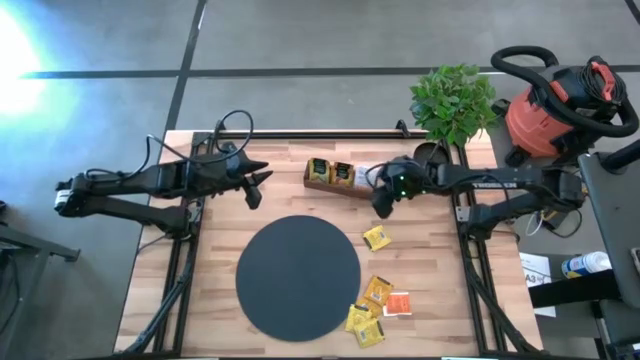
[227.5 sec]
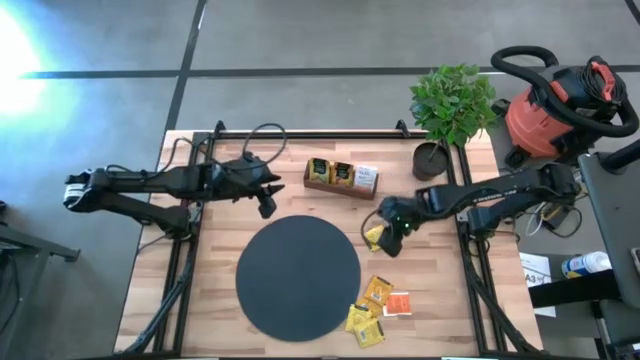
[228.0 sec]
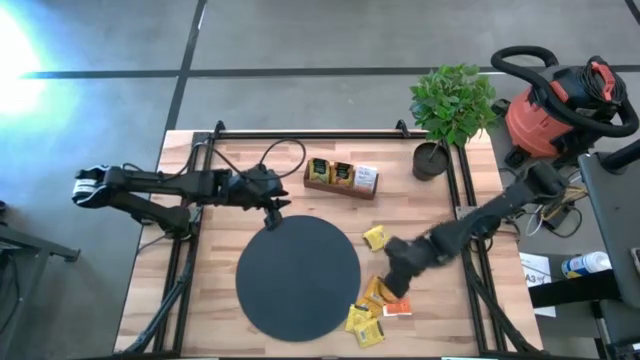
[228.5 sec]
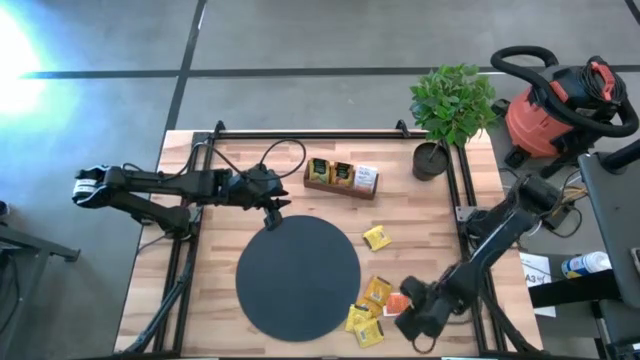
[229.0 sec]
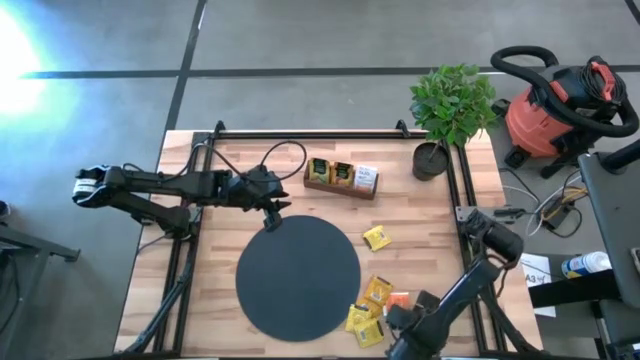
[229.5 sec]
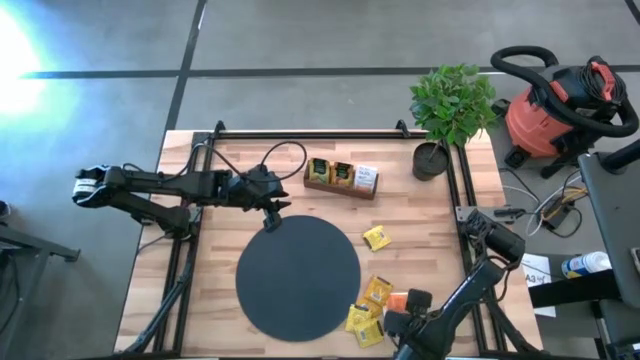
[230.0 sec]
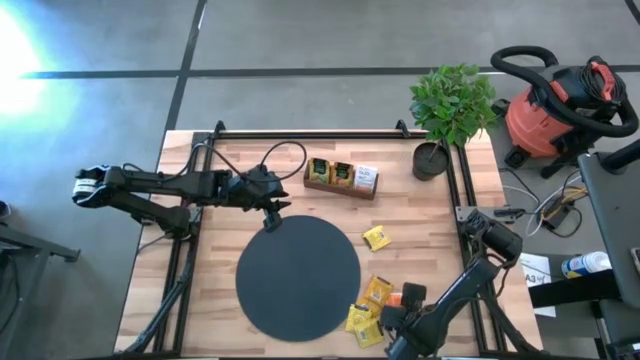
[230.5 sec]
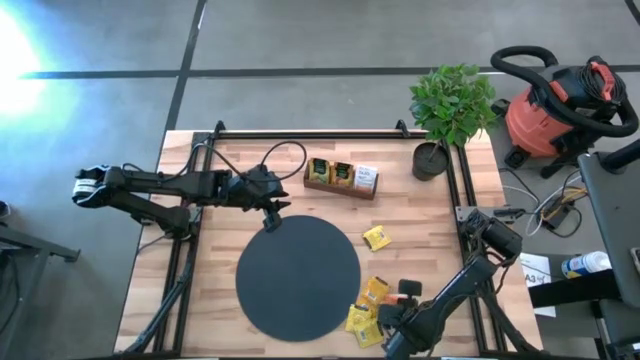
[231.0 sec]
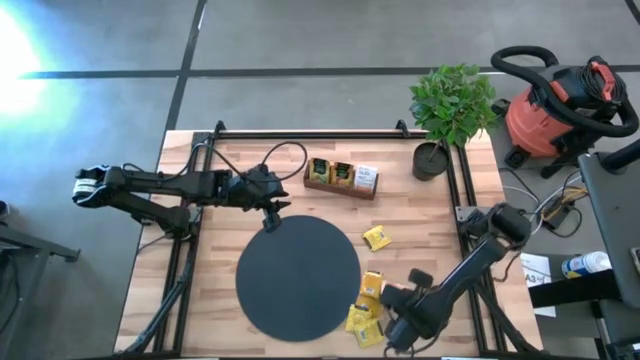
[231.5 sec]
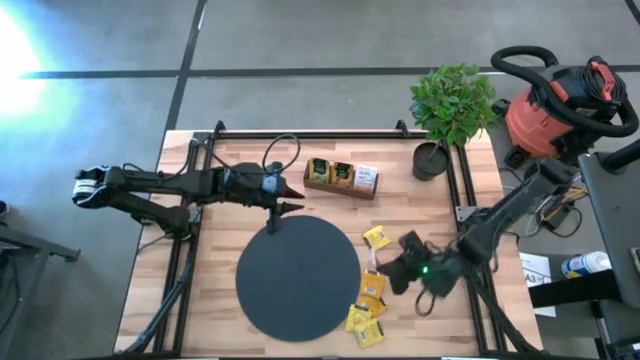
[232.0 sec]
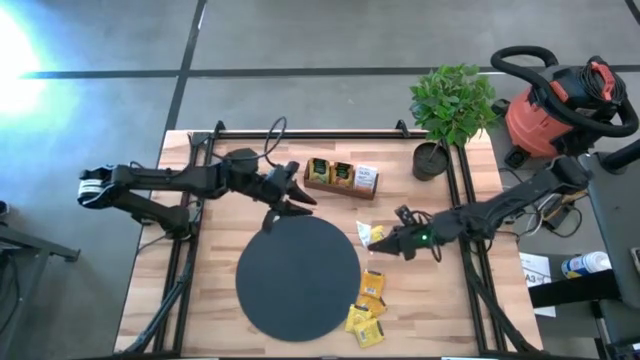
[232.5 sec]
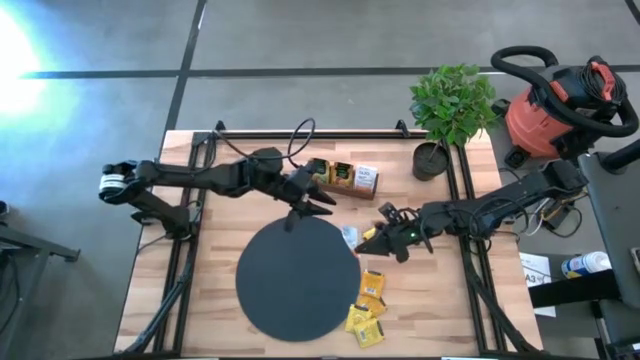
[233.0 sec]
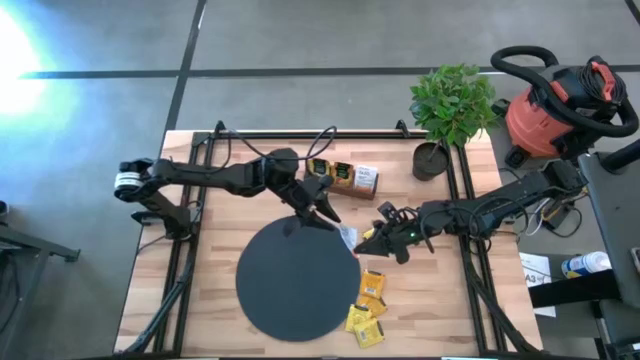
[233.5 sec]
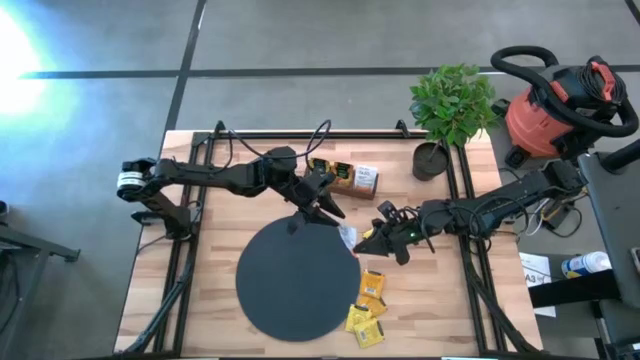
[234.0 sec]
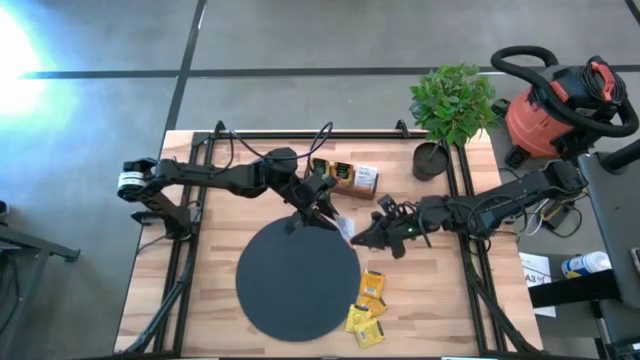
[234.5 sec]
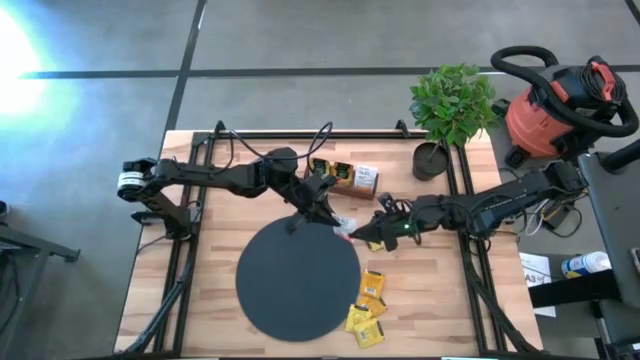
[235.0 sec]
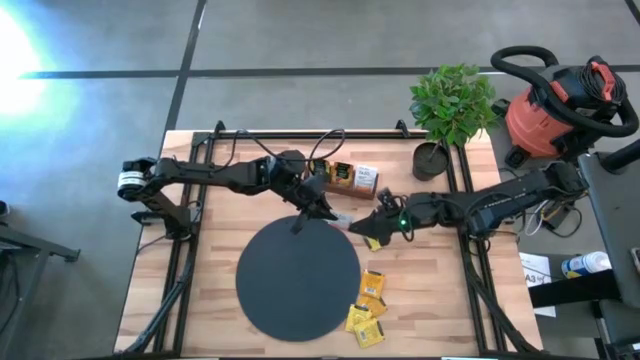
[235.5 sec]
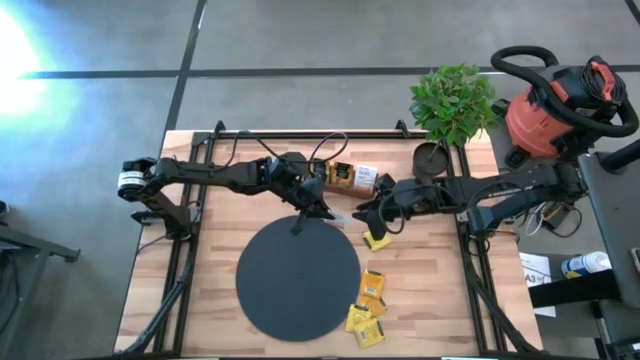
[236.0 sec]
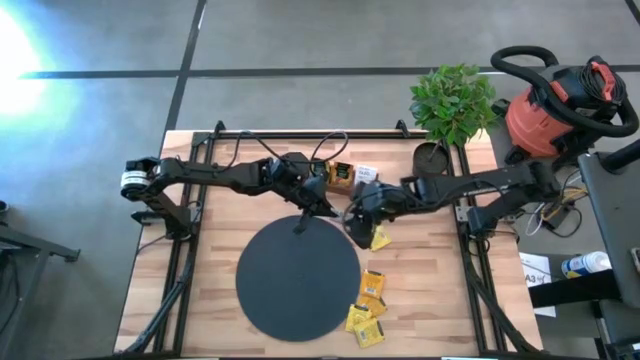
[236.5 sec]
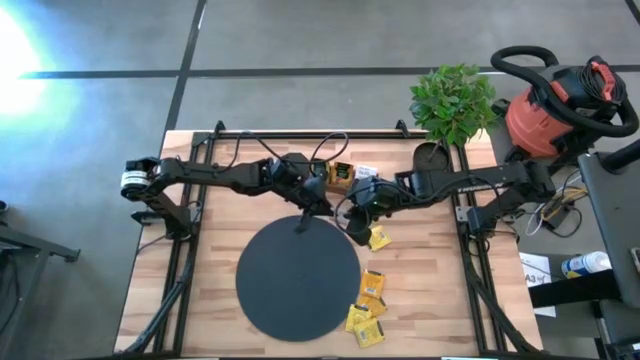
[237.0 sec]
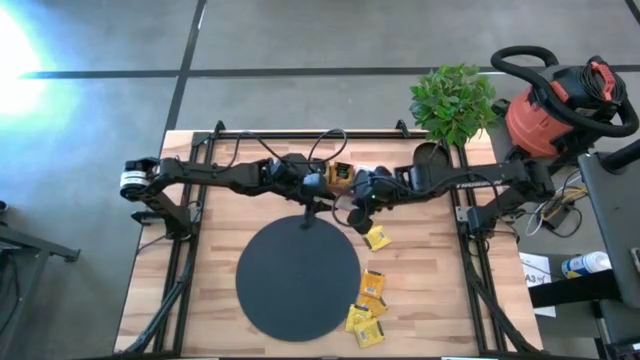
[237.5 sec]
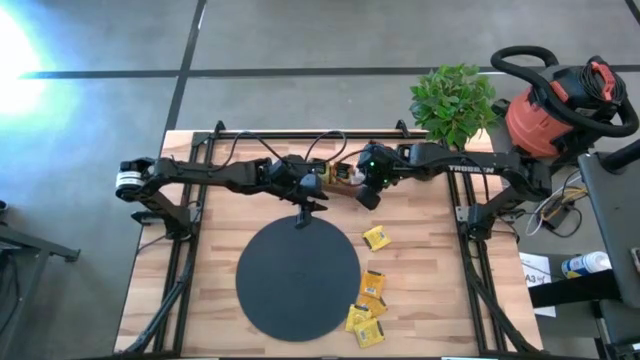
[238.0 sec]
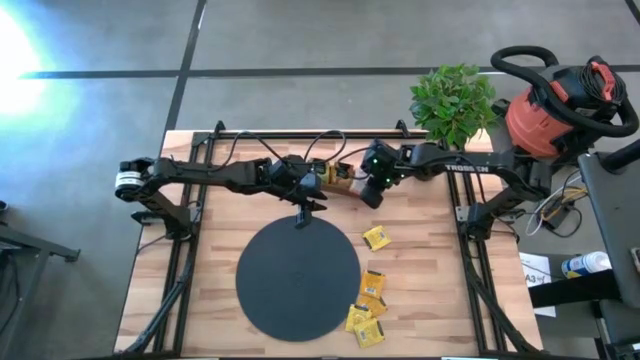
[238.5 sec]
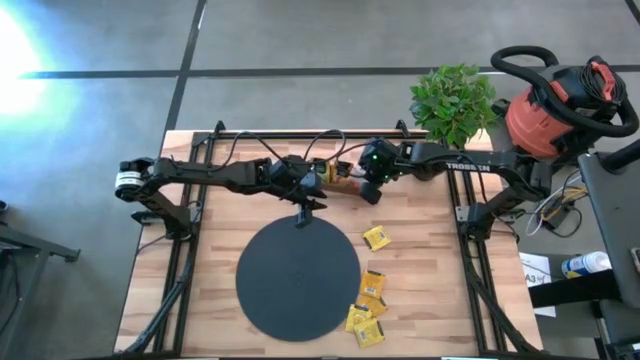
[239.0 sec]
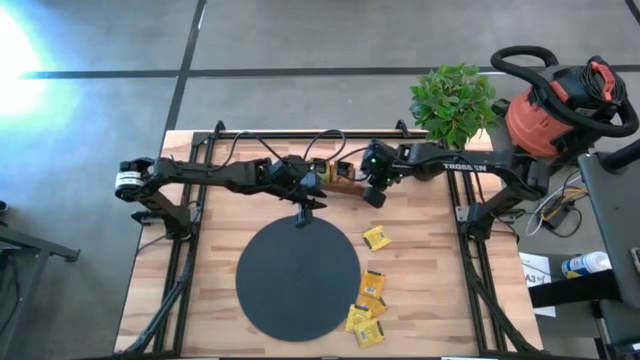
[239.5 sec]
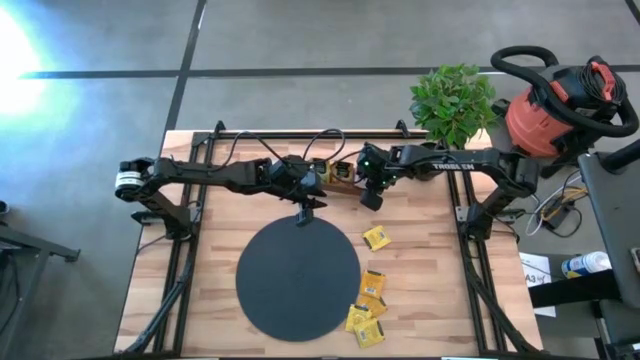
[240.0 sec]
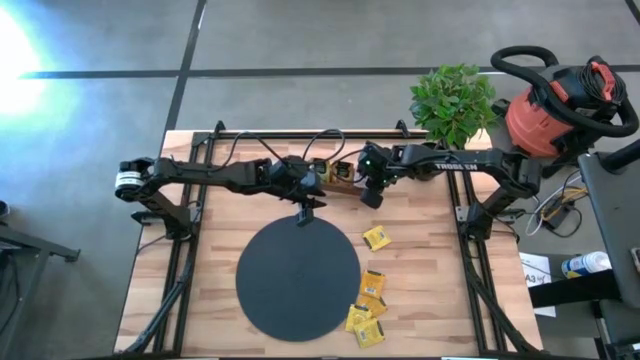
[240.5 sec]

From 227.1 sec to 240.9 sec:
Task: Pick & Place Tea
Put the white tea bag into the right section of the wooden organizer

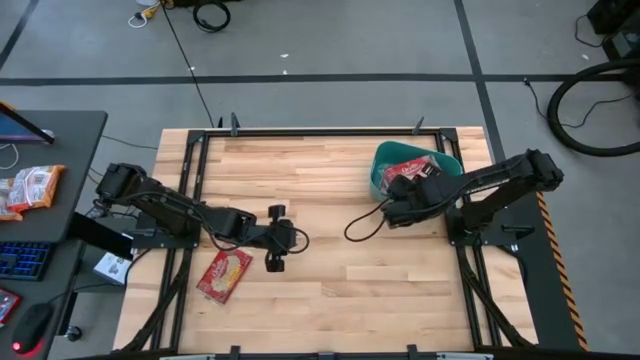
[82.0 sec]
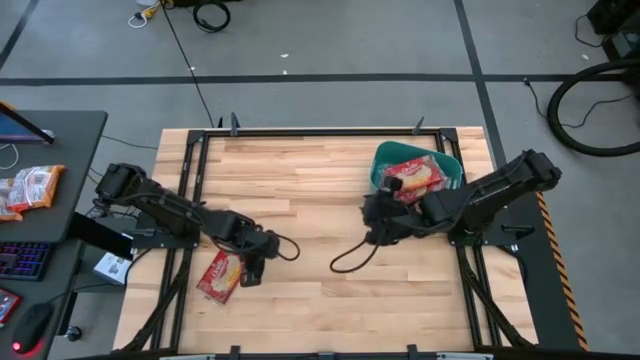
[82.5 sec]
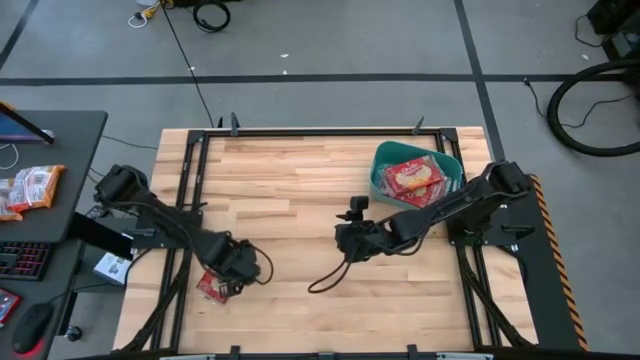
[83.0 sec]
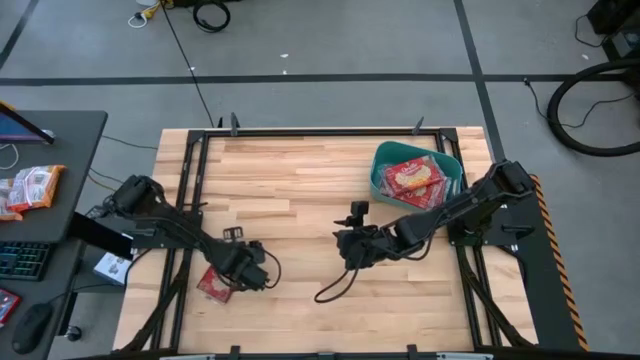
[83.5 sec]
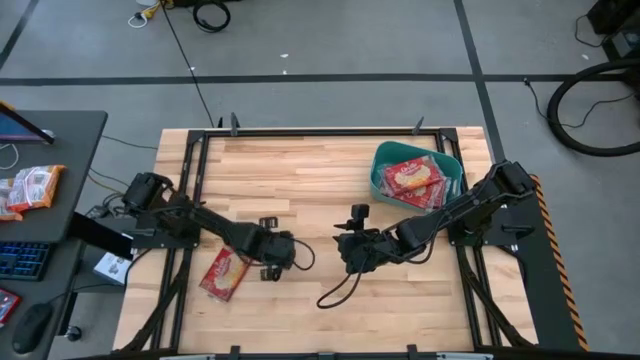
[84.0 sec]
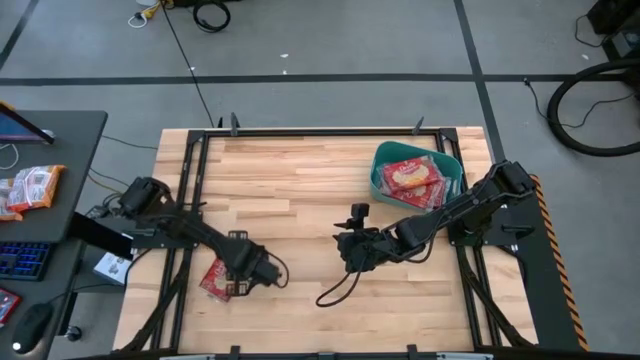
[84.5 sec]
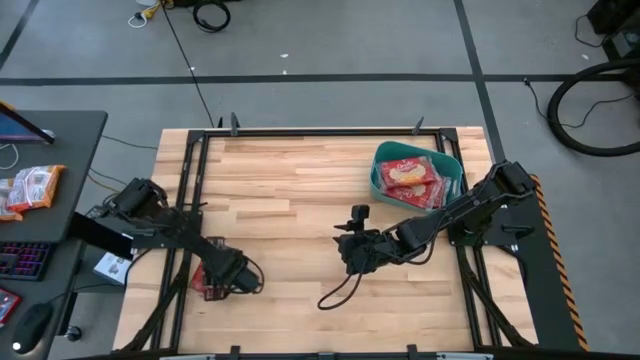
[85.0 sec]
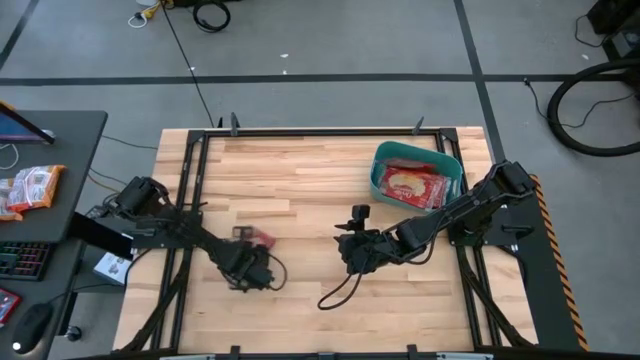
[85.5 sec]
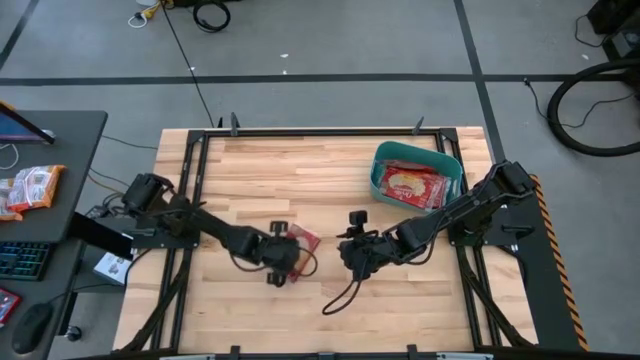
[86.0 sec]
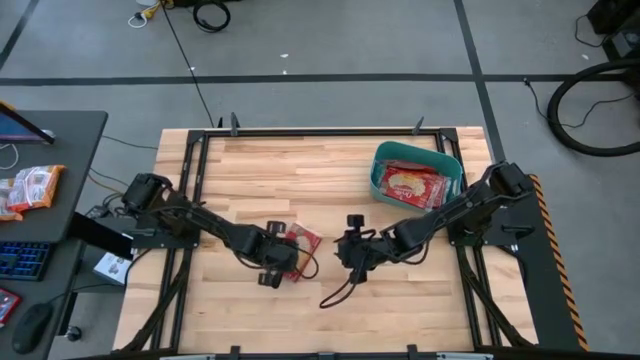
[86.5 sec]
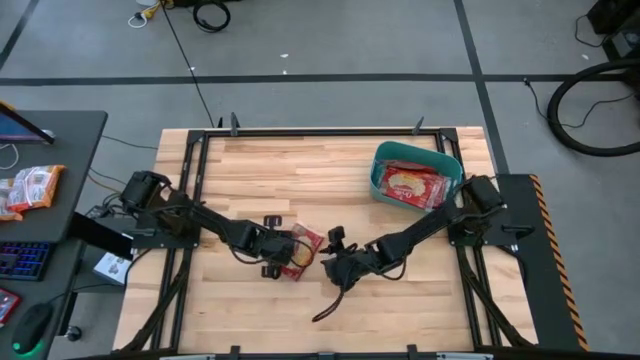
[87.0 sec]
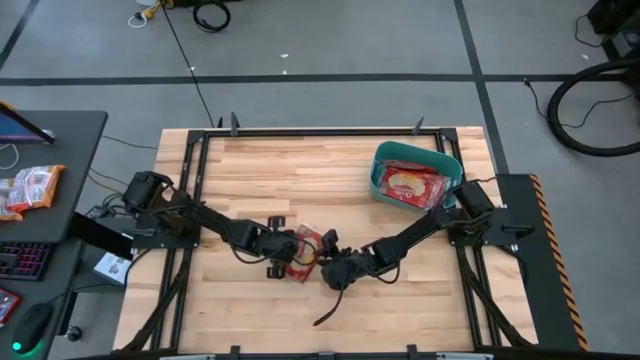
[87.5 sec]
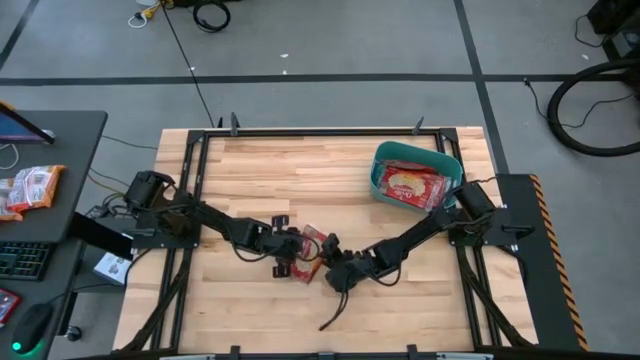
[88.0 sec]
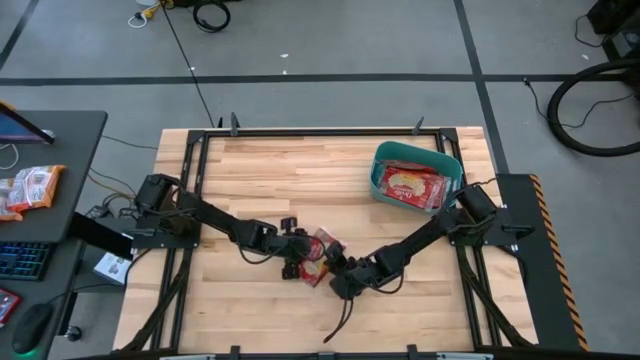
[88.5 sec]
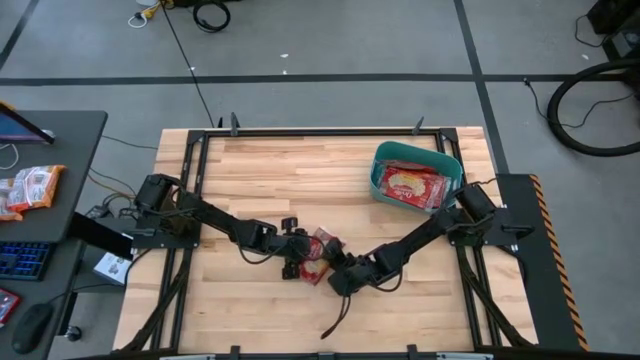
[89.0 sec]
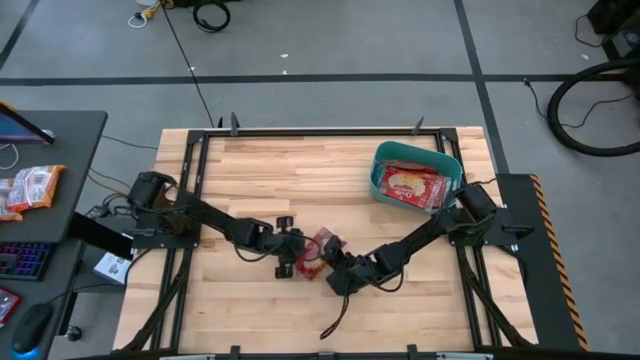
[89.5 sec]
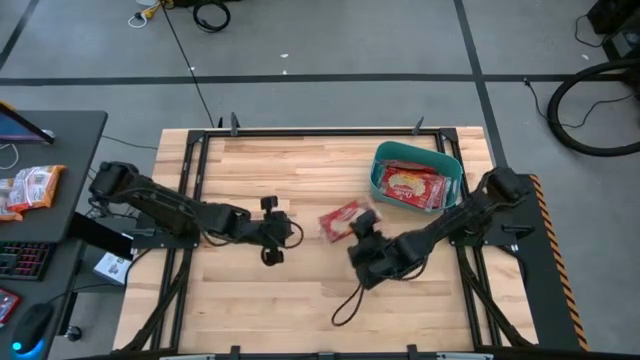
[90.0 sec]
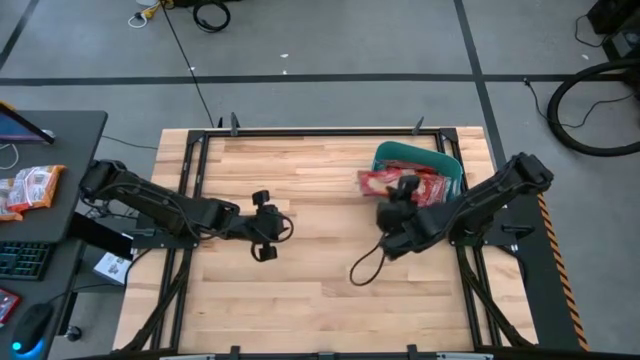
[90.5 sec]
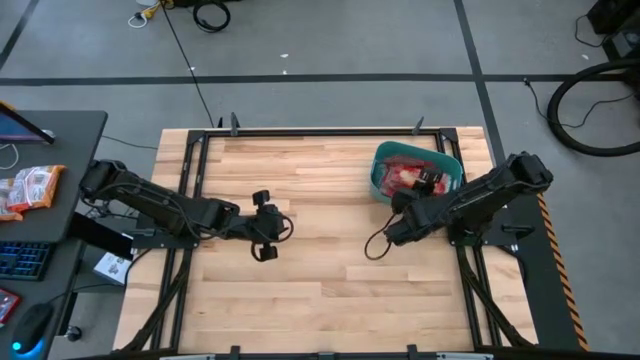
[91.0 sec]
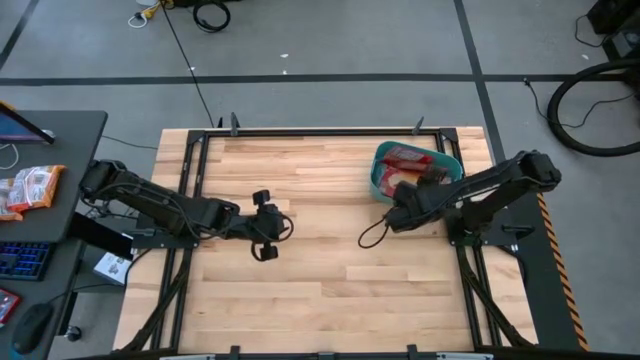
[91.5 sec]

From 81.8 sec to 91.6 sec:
Task: Sort popcorn bags into baskets
Put the red popcorn bag into the green container
